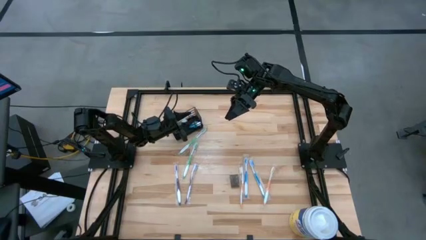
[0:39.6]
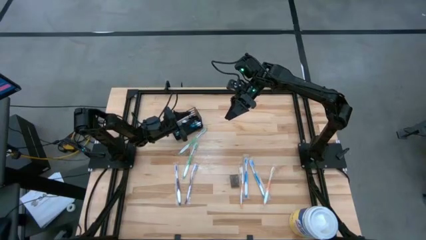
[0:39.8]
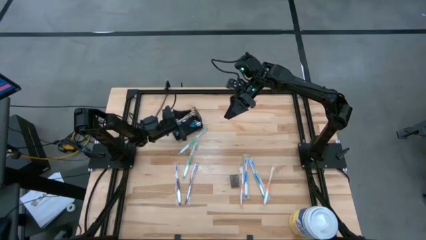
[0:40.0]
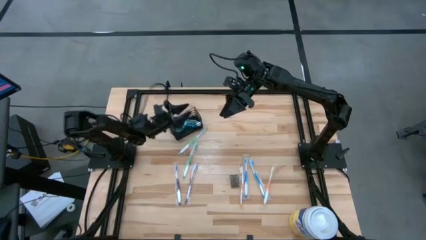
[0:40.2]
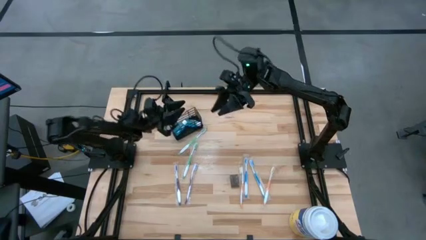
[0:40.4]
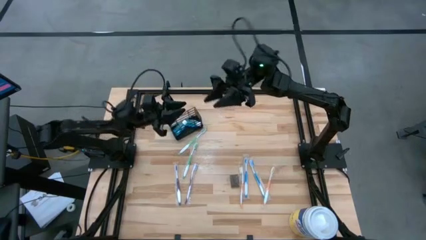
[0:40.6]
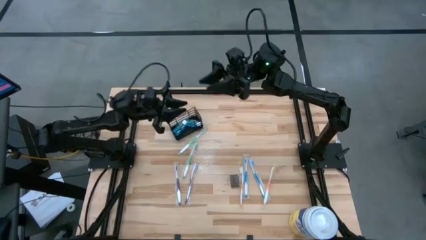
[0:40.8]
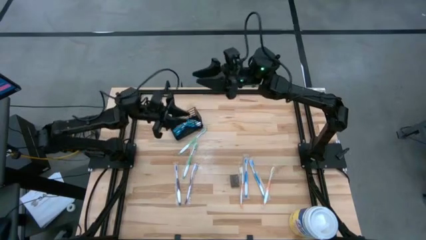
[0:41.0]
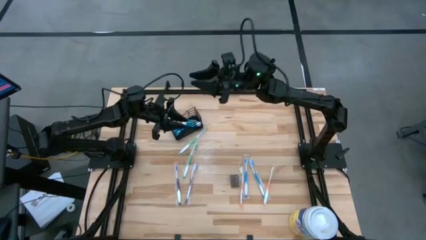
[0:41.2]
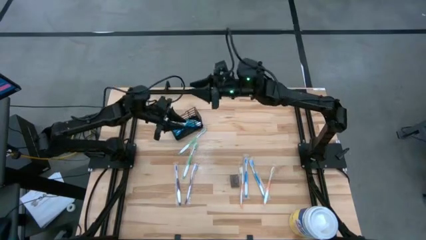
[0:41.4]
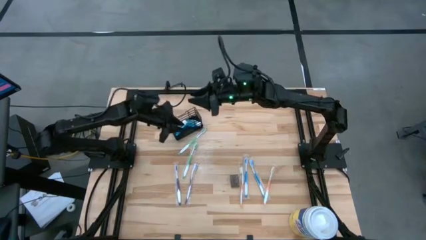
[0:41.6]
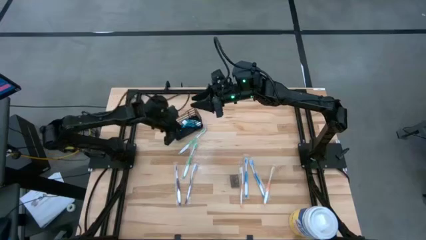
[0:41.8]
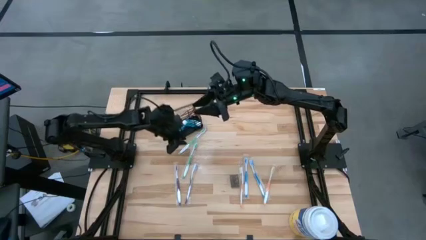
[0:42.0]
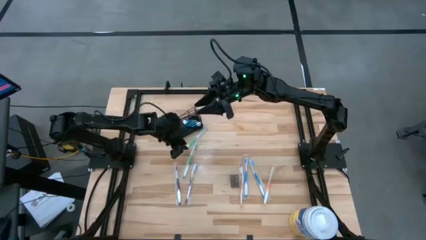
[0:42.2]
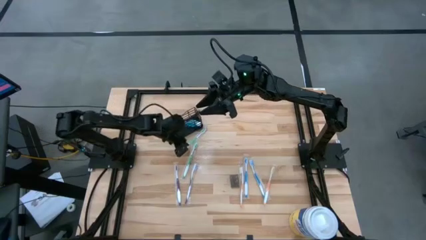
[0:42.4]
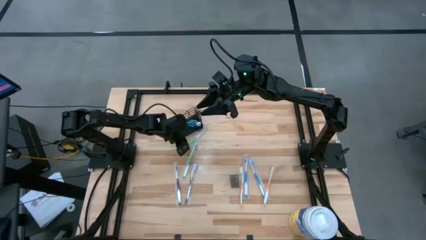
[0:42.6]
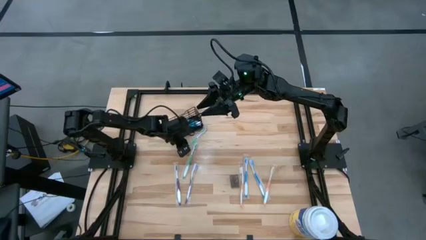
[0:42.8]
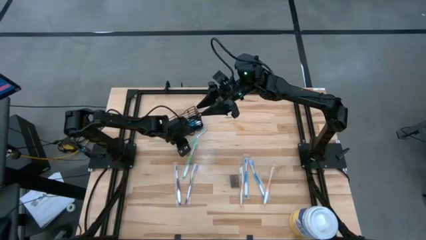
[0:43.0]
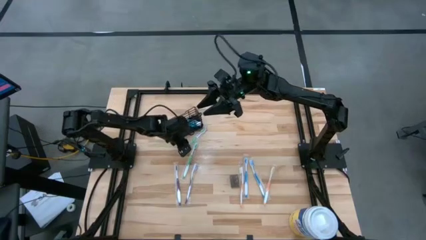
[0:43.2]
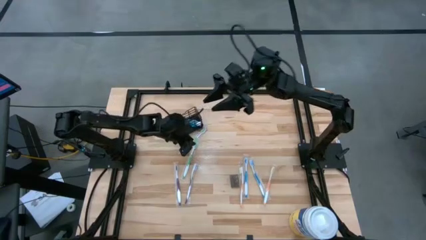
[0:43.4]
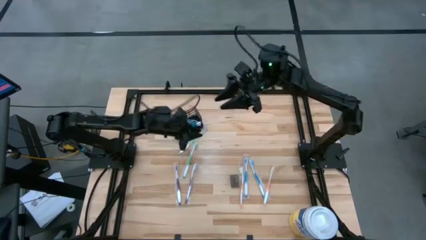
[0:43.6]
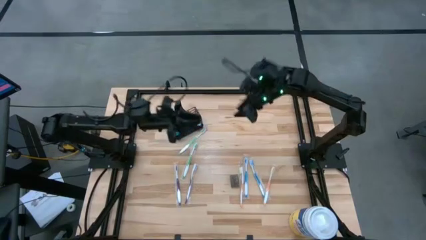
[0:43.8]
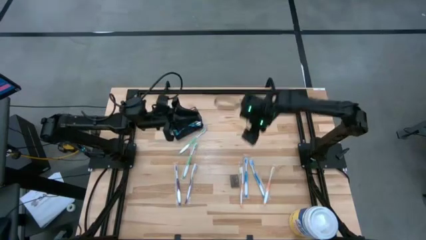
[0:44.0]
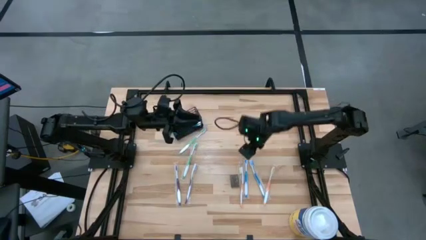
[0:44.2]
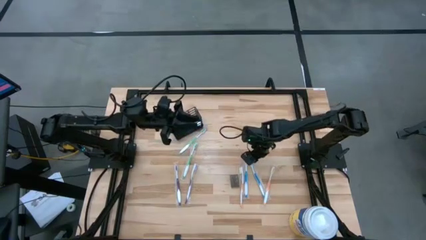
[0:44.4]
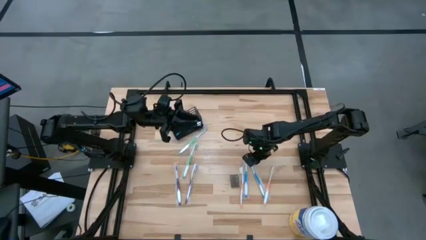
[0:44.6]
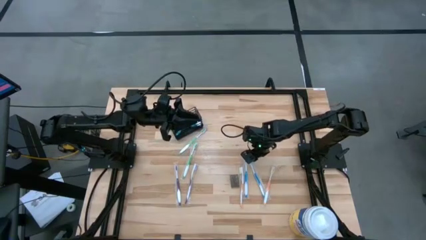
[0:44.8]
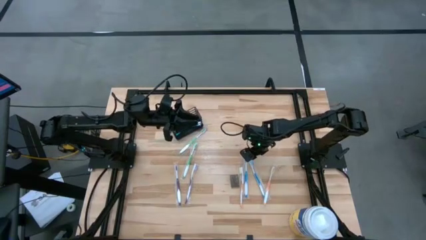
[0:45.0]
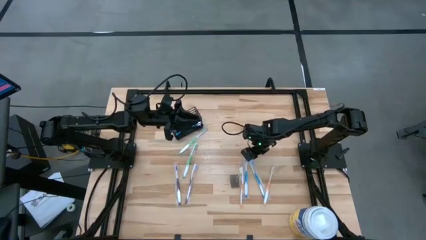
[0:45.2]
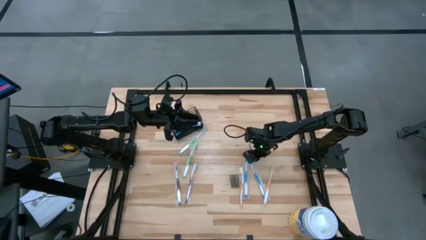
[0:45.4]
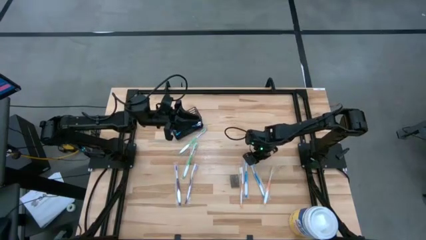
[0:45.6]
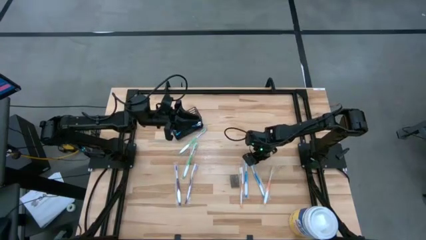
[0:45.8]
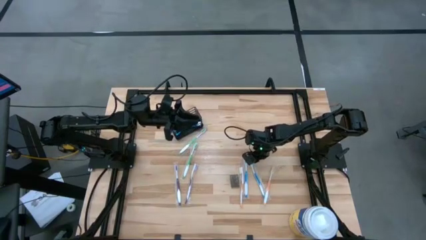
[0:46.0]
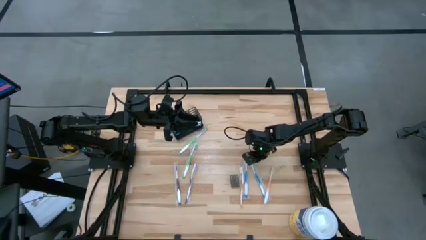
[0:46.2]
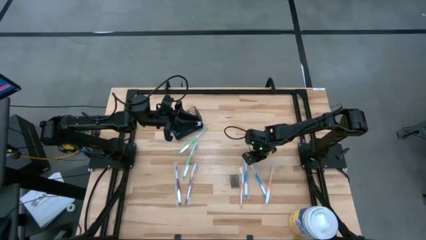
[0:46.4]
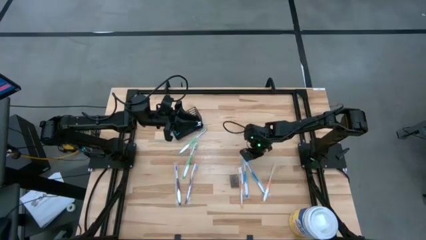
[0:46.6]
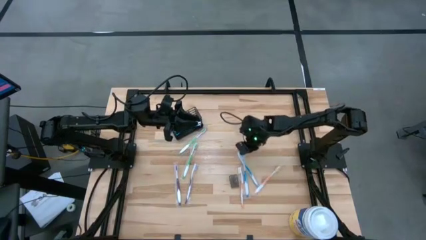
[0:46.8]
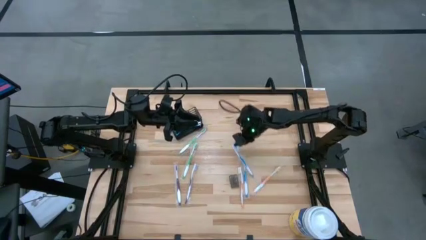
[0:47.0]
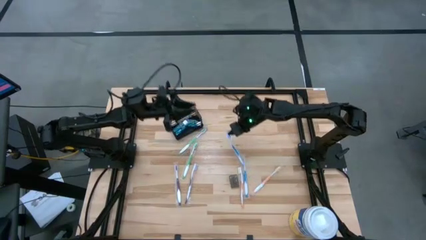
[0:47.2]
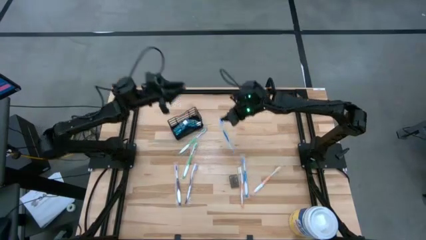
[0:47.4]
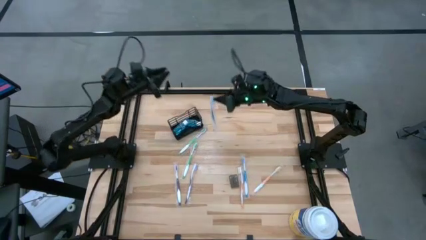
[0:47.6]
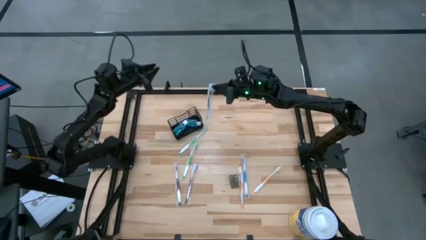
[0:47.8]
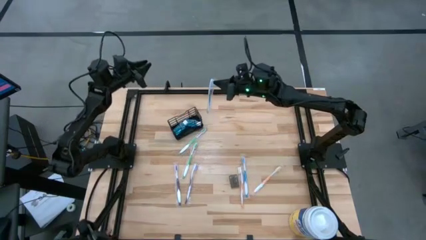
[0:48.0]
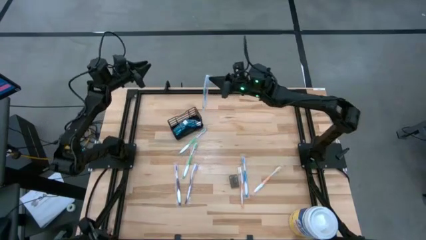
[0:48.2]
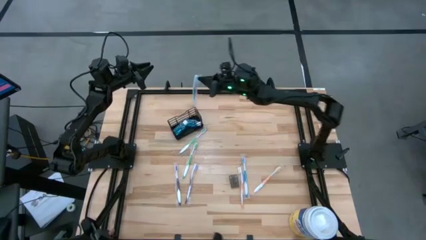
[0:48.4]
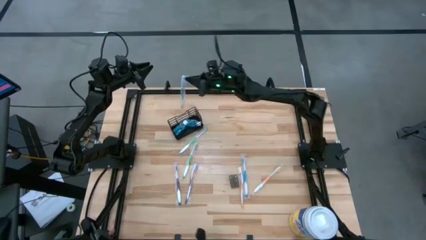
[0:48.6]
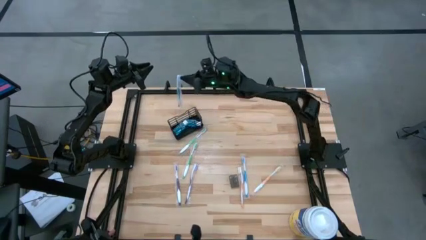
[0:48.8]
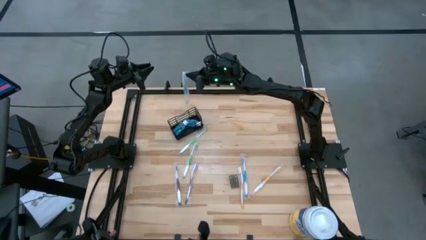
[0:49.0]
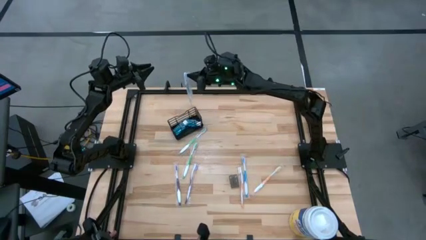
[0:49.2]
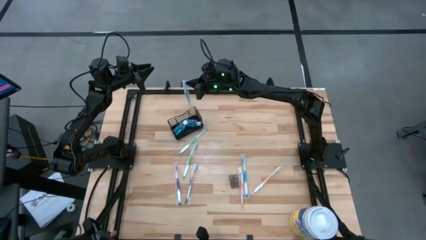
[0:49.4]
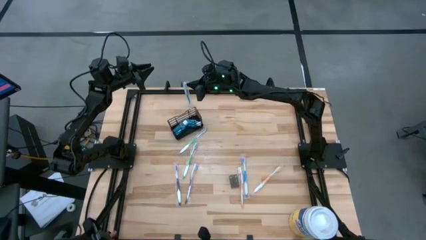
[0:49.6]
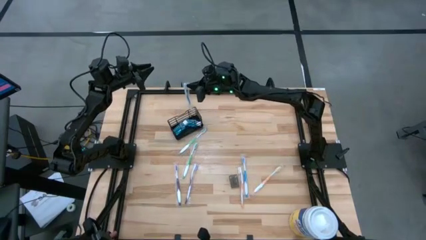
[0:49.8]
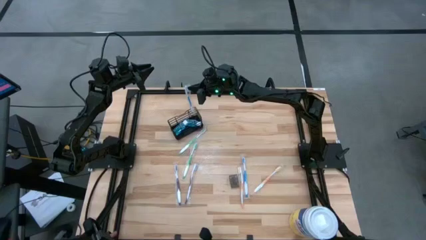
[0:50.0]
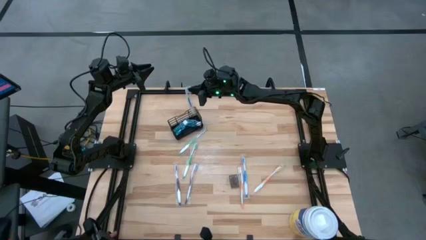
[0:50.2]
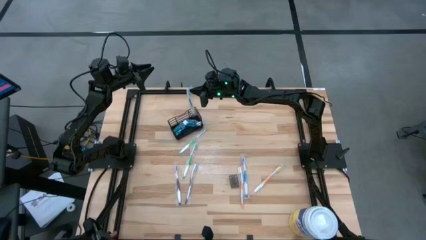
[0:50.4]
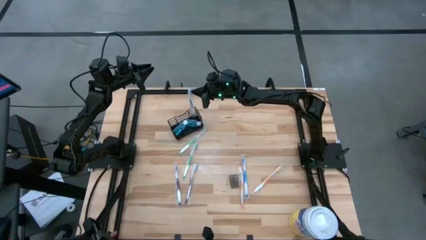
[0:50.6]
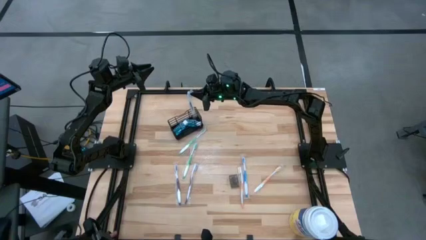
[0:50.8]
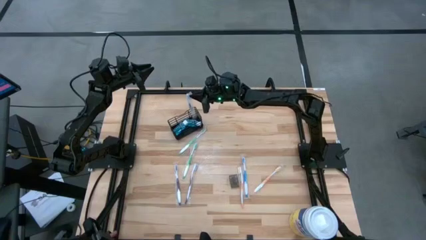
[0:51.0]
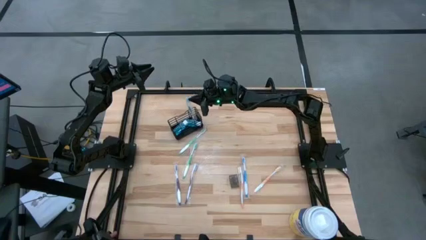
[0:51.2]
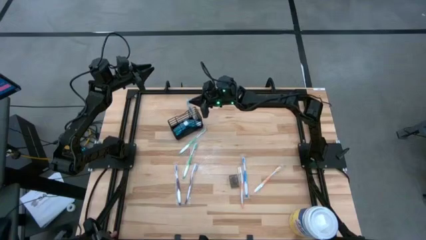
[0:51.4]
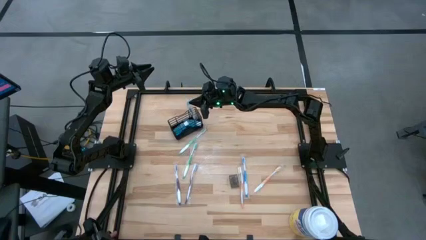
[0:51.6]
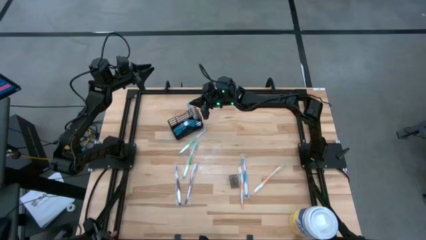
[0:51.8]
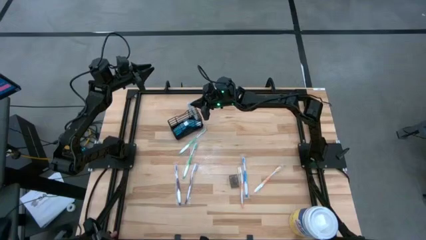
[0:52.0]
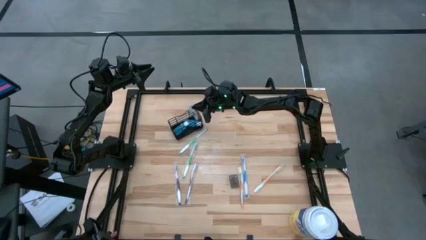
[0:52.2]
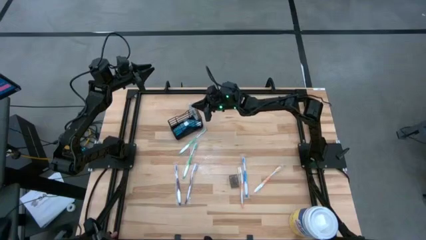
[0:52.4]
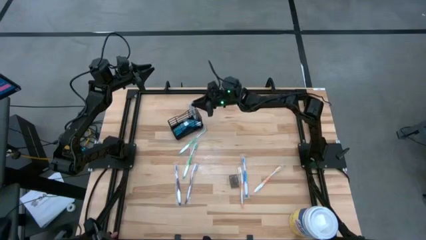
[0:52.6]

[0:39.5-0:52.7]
Task: Pick & Place toothbrushing station
Put the blue toothbrush into the black organizer
